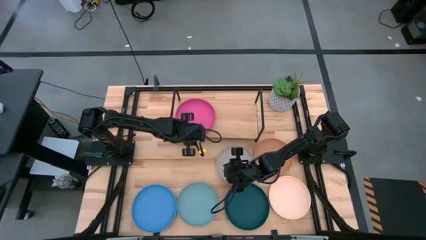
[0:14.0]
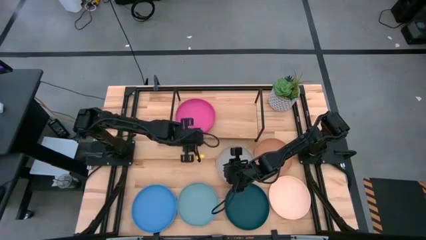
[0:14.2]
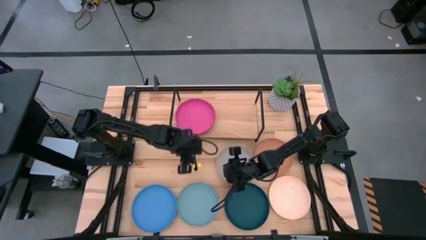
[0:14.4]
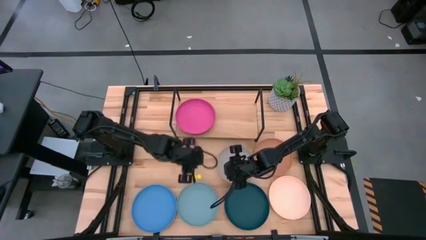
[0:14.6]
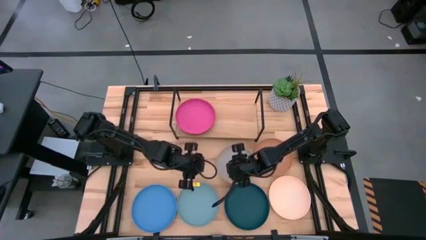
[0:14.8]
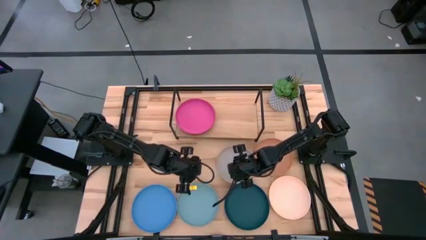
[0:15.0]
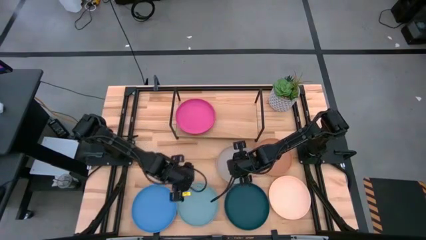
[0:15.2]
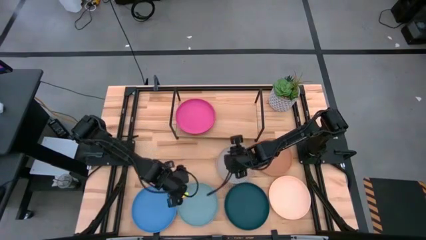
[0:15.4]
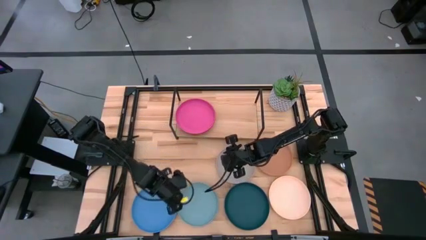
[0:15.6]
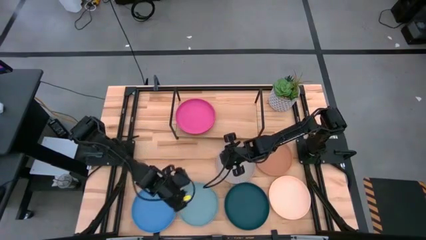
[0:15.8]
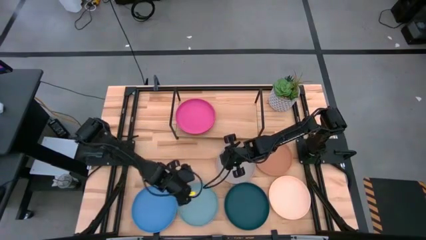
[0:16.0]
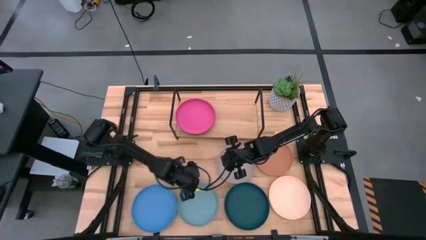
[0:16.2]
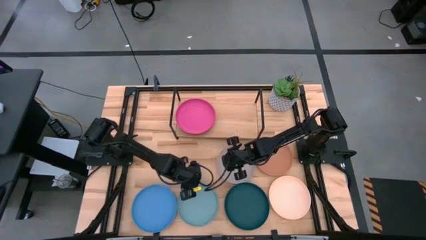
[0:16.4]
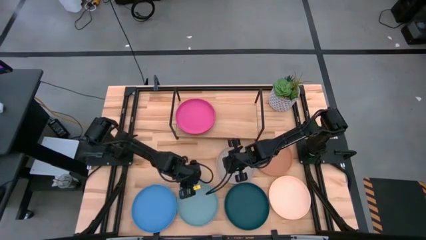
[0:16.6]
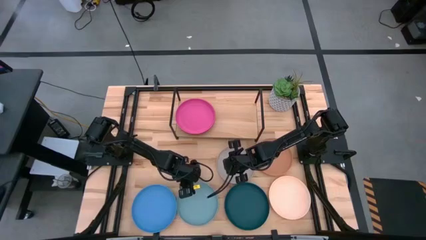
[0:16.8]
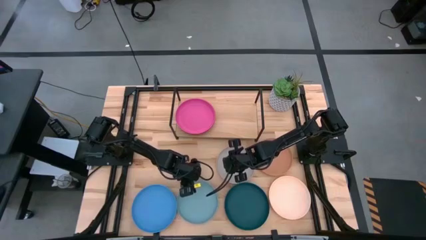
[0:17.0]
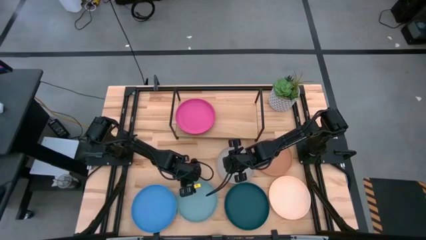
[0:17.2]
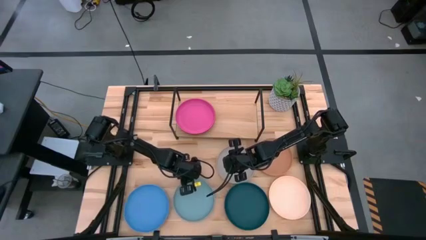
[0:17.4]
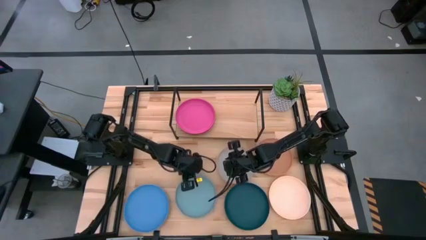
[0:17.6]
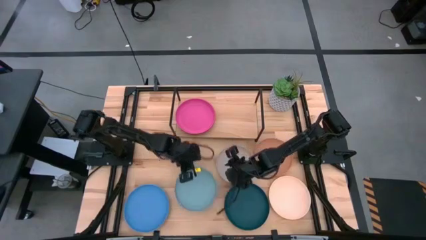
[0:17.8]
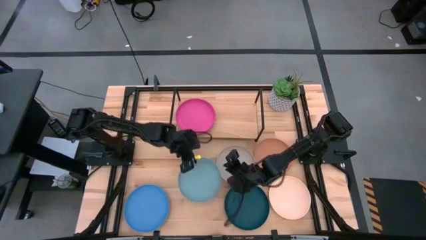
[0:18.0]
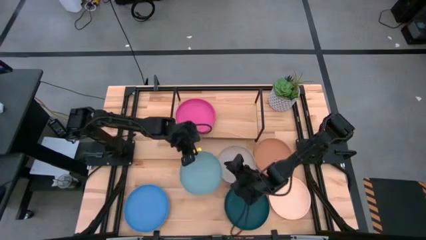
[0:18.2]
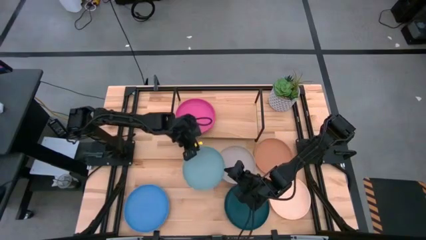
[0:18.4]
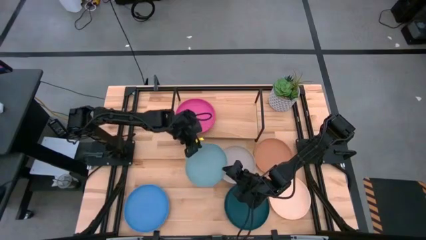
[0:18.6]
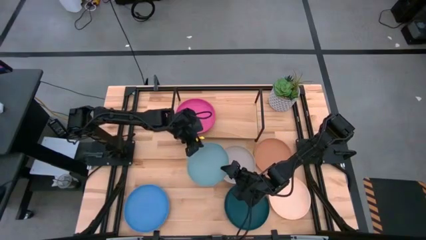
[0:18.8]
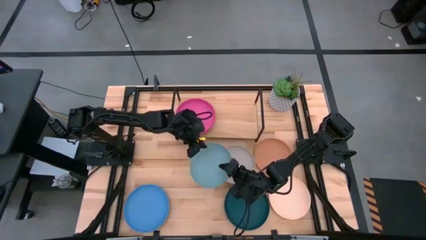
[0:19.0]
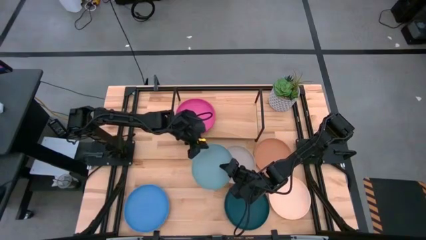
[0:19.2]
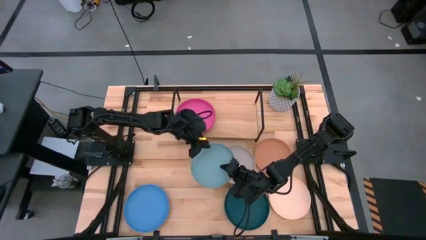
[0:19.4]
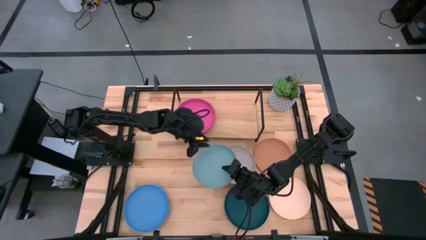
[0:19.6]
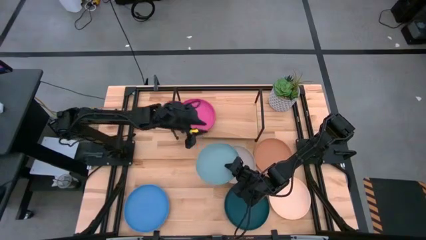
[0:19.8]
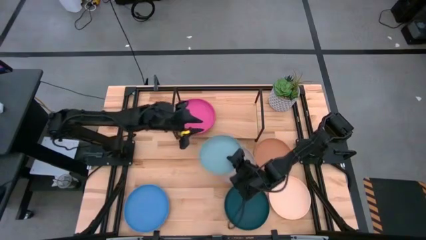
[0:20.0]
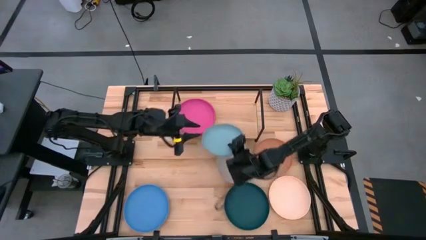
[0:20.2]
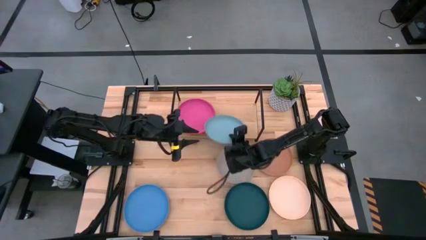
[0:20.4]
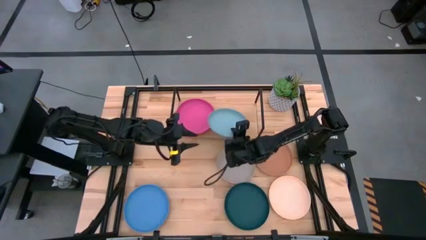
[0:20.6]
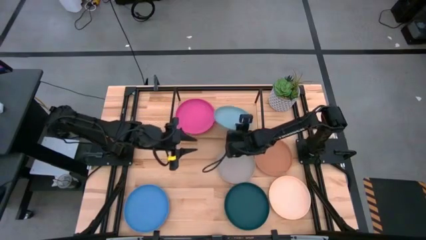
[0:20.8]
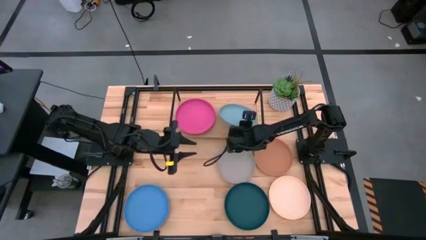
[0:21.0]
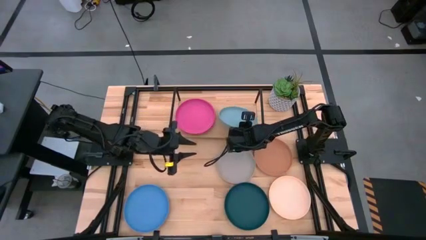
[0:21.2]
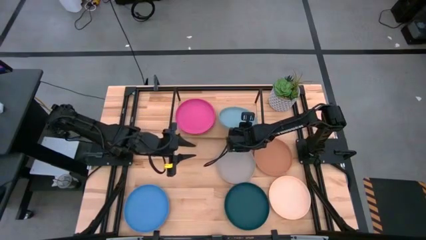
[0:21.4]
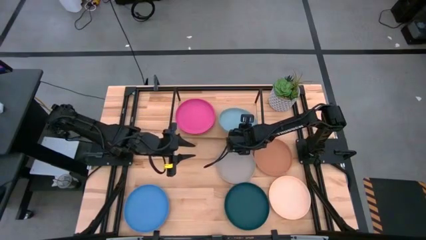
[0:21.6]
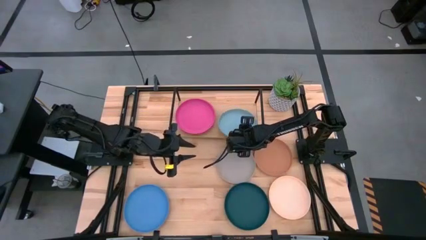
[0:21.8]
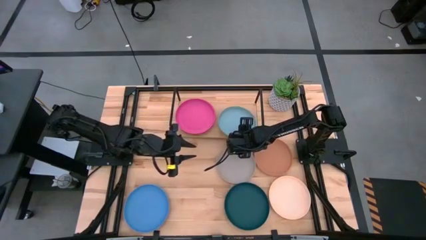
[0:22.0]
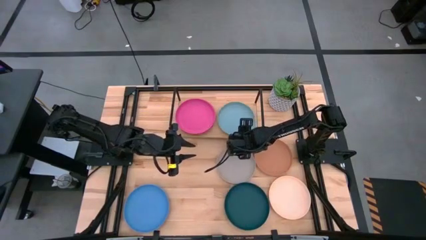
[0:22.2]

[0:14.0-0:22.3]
Task: Place and stack plates onto a shelf
Put the light blue plate on the shelf

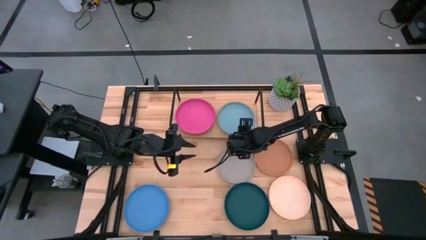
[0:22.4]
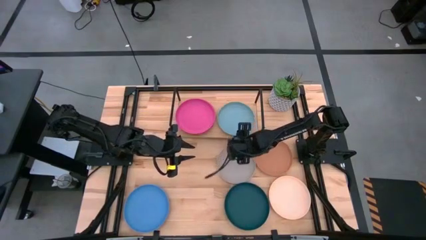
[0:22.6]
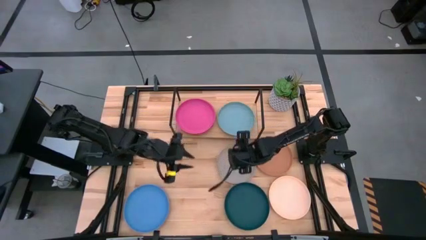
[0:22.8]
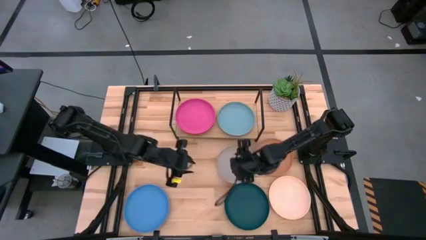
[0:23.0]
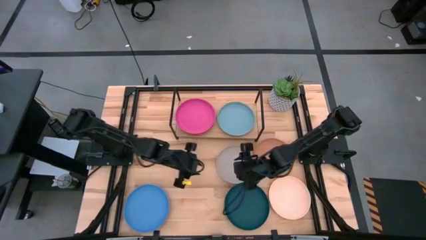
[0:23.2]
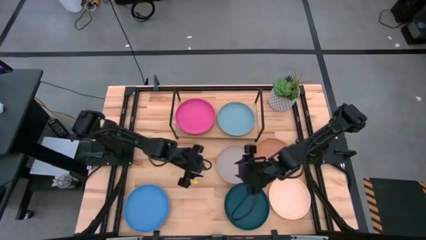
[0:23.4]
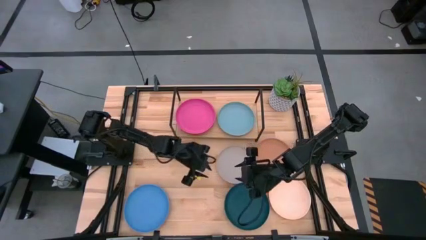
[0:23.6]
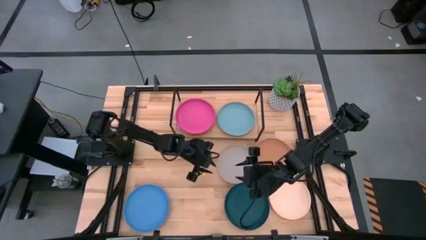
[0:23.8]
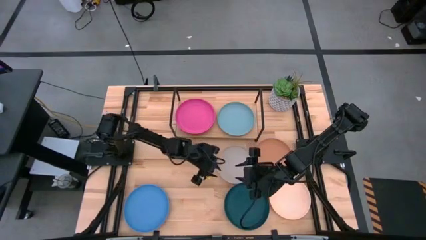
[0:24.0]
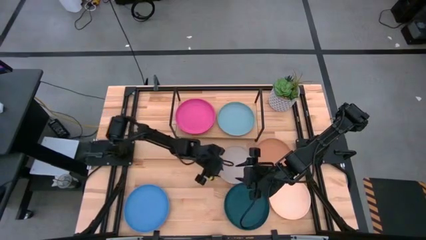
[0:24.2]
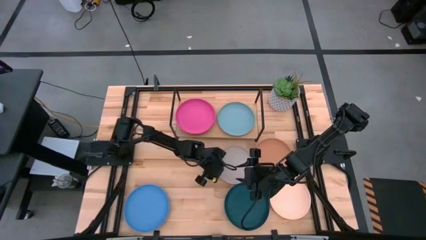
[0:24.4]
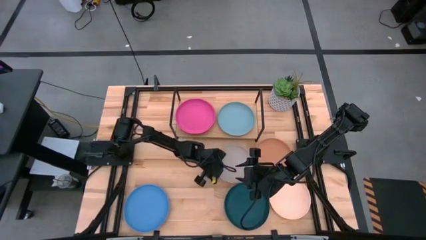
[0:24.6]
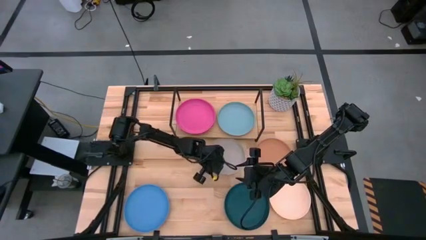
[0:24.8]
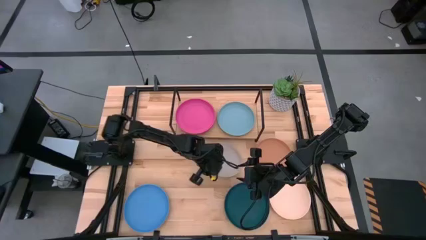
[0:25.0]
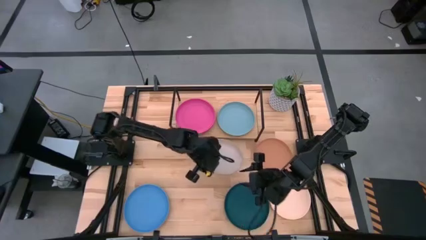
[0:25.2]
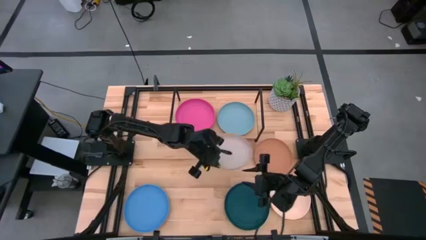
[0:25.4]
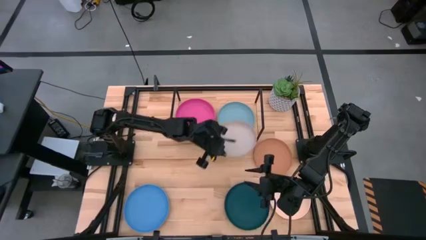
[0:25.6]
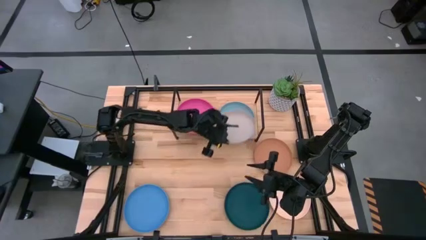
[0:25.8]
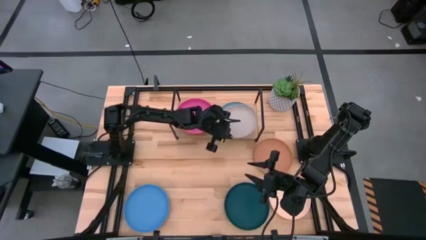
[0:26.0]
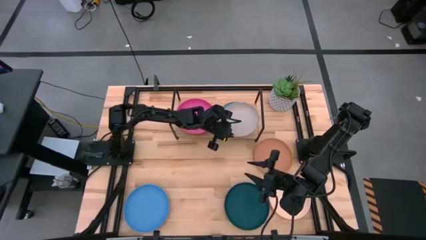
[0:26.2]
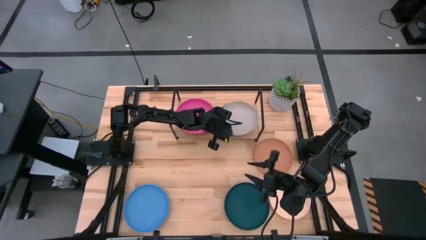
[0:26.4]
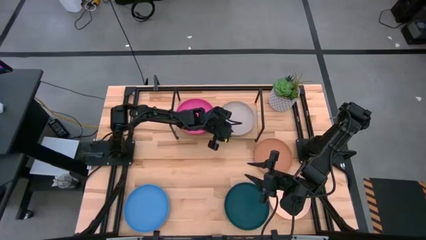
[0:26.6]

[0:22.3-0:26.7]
Stack the gray plate on the light blue plate

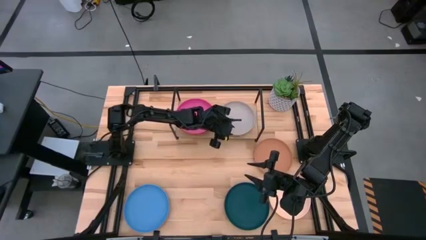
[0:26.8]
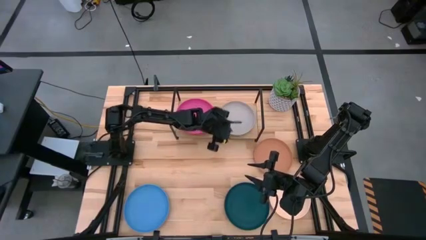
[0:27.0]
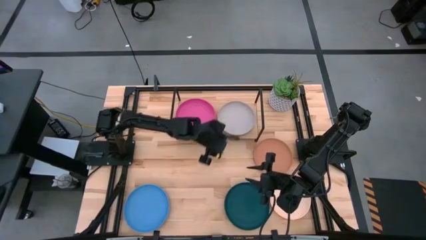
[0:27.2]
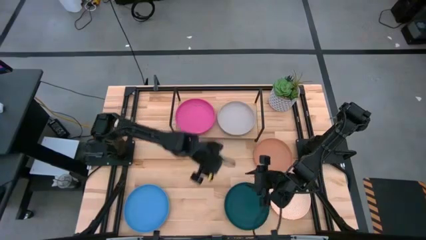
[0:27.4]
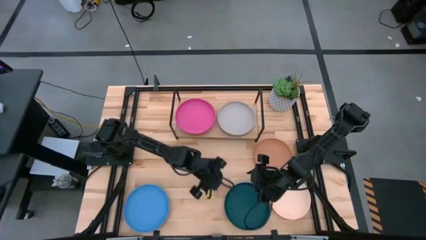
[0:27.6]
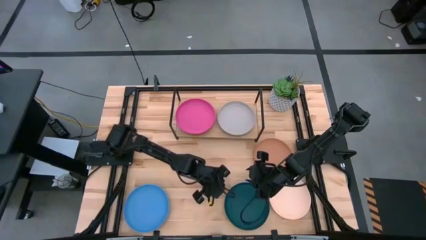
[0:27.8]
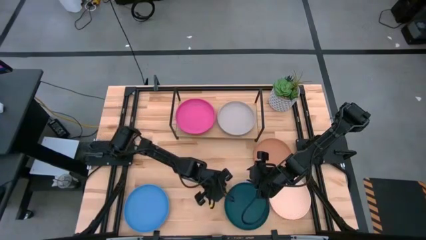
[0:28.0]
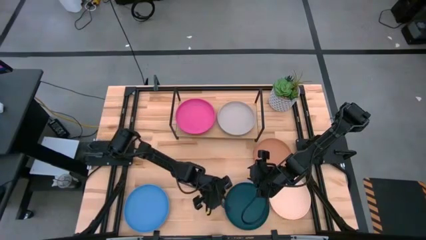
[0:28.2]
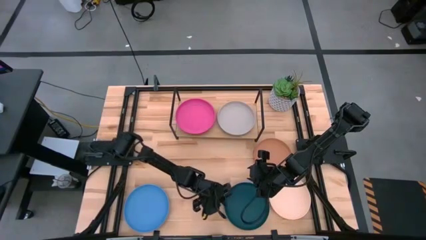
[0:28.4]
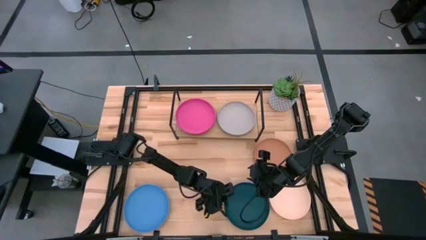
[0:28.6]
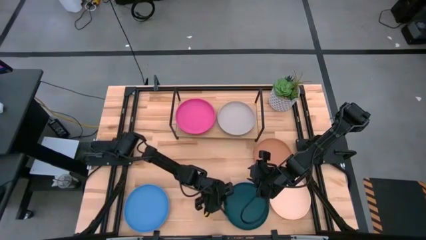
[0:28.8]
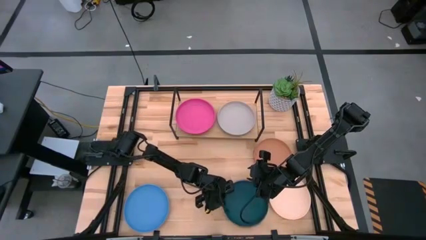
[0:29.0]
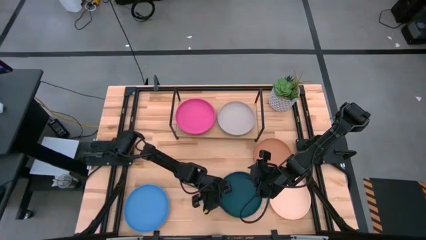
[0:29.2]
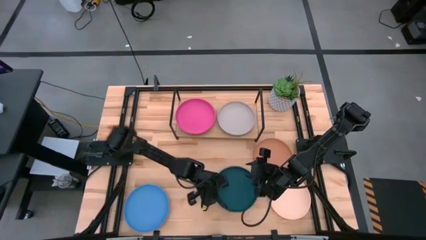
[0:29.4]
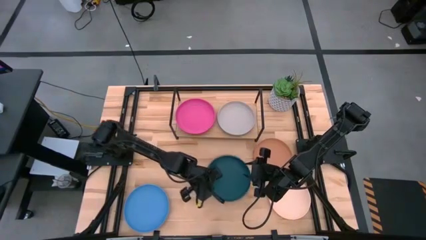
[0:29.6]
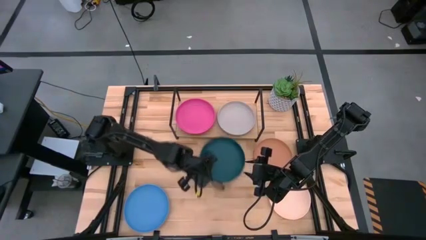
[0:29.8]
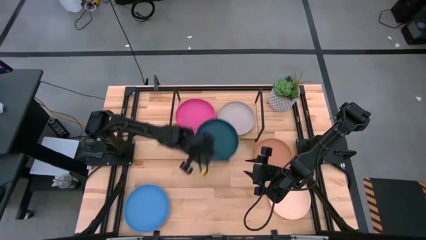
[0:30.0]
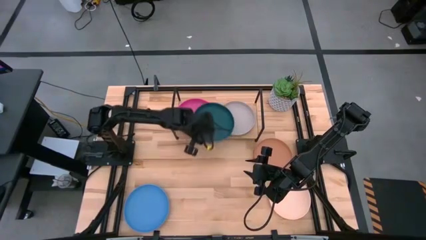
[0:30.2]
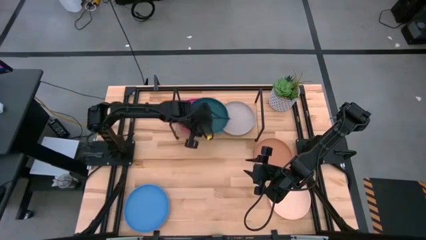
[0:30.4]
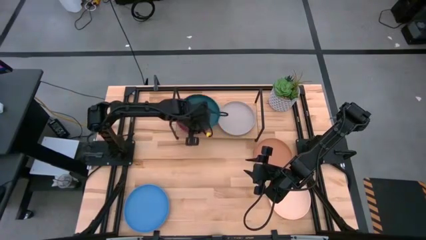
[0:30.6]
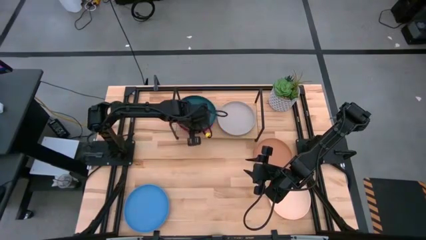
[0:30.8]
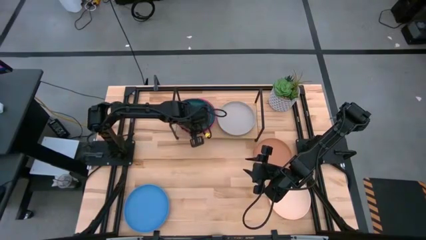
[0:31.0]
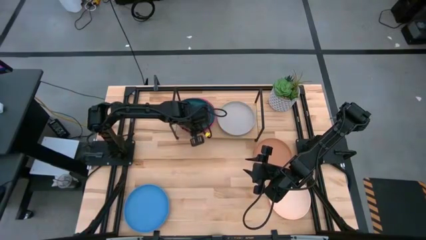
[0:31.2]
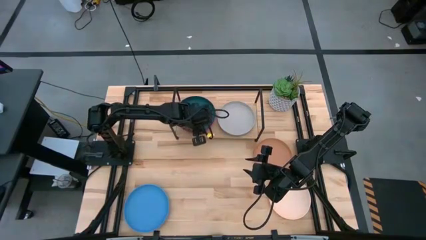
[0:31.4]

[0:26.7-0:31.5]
Stack the dark green plate on the pink plate
